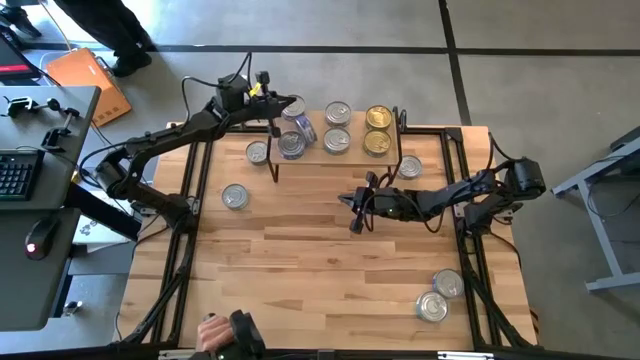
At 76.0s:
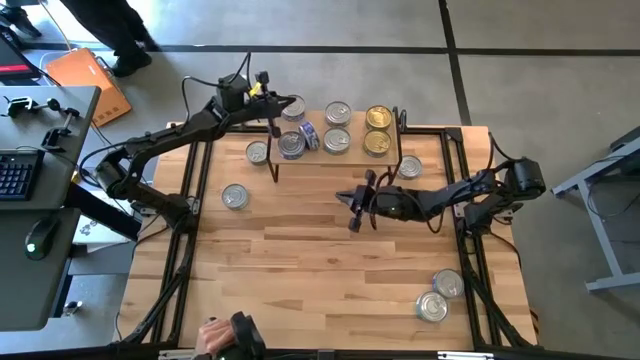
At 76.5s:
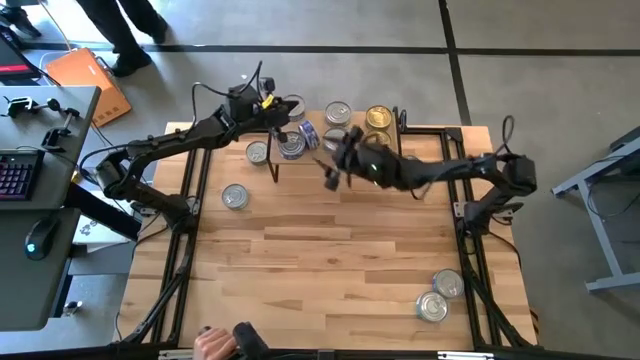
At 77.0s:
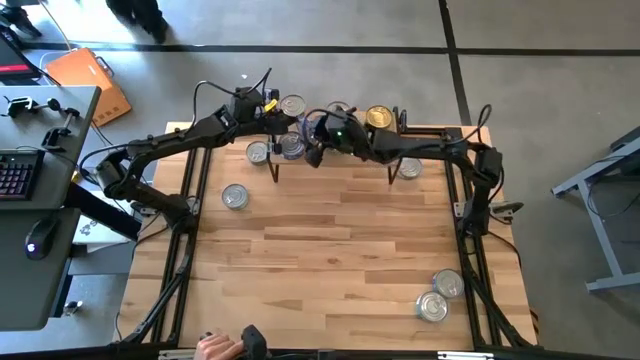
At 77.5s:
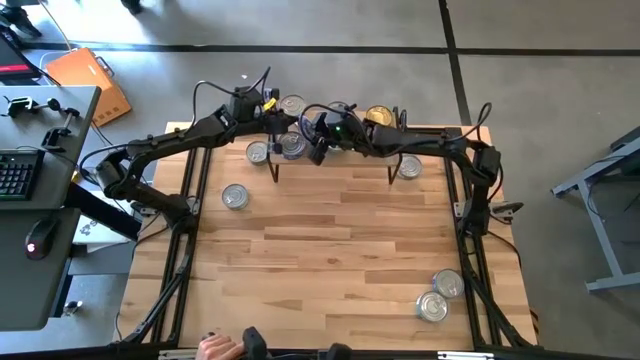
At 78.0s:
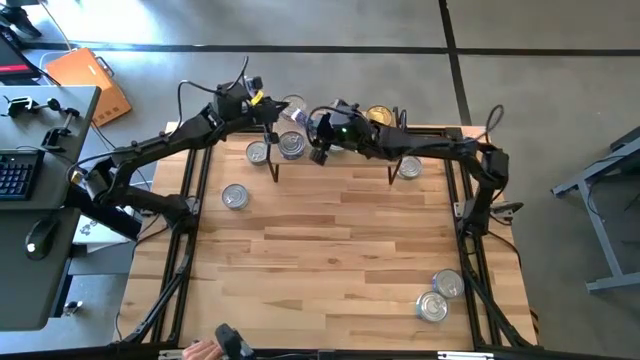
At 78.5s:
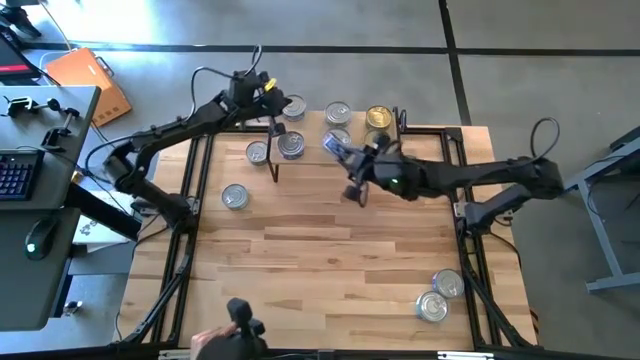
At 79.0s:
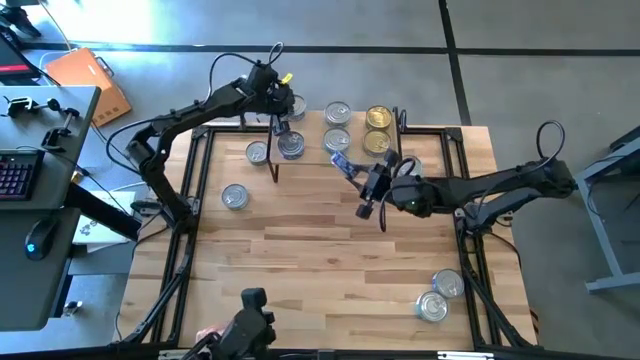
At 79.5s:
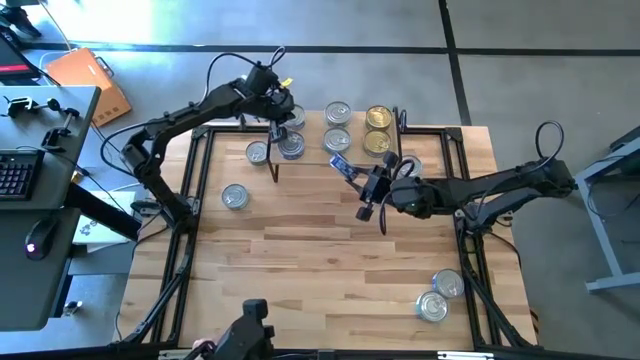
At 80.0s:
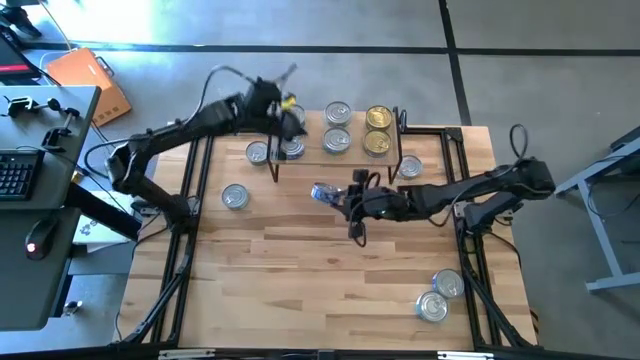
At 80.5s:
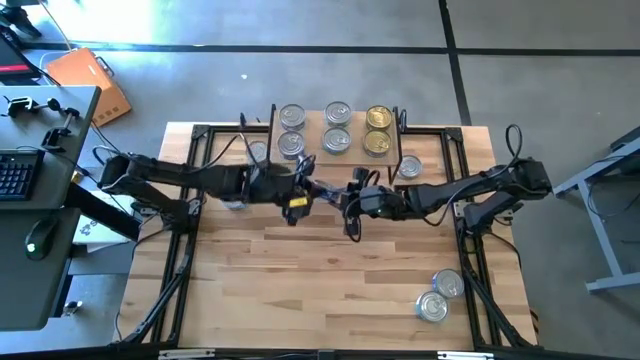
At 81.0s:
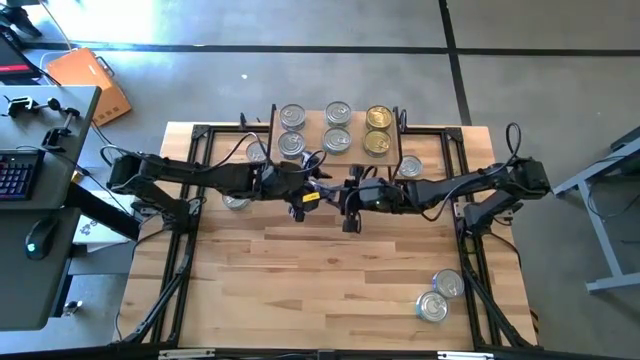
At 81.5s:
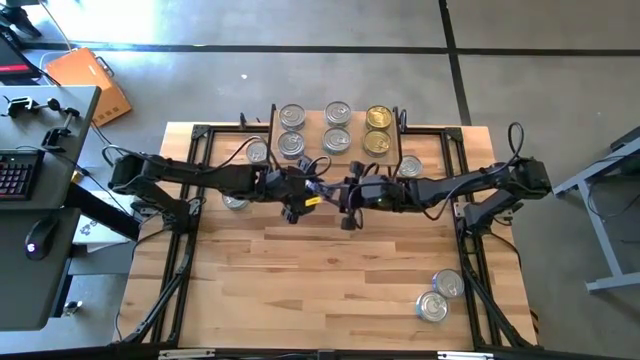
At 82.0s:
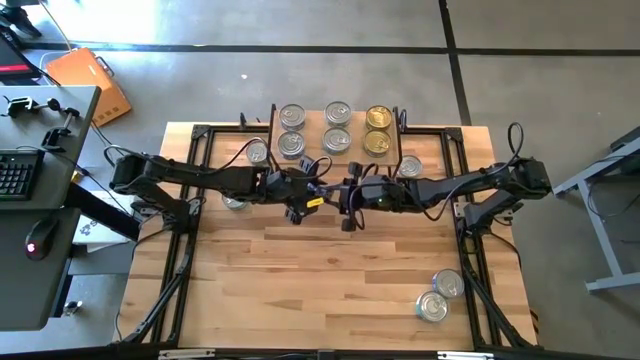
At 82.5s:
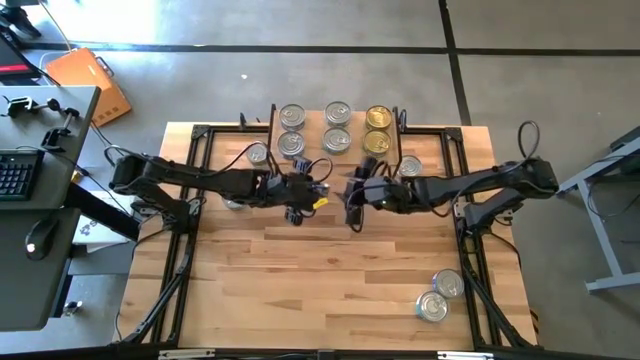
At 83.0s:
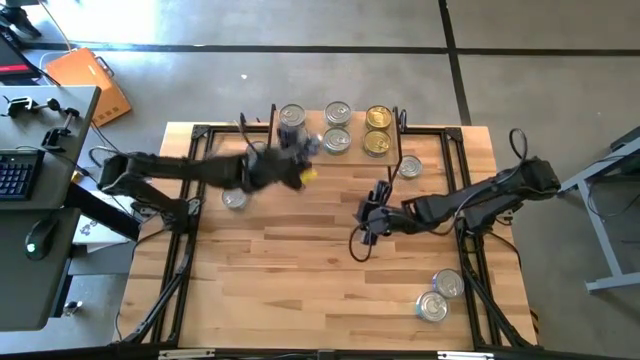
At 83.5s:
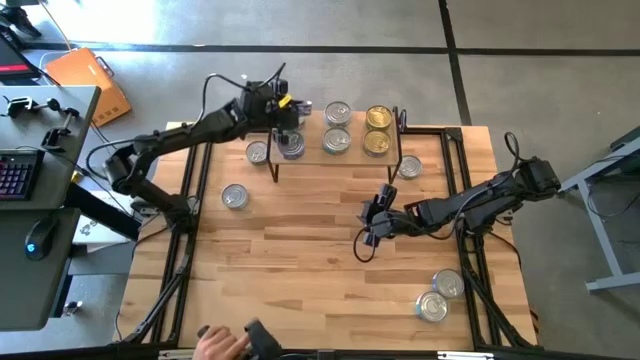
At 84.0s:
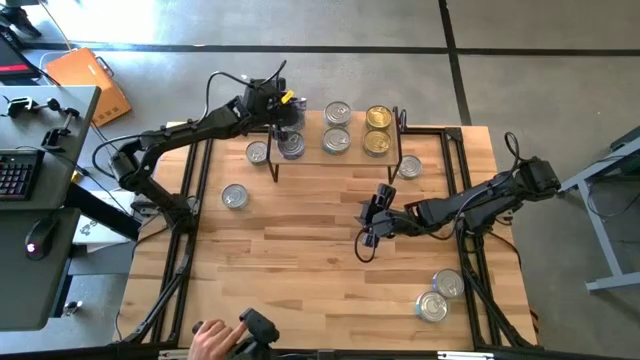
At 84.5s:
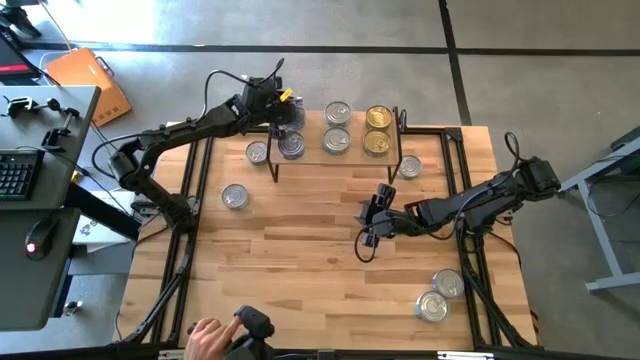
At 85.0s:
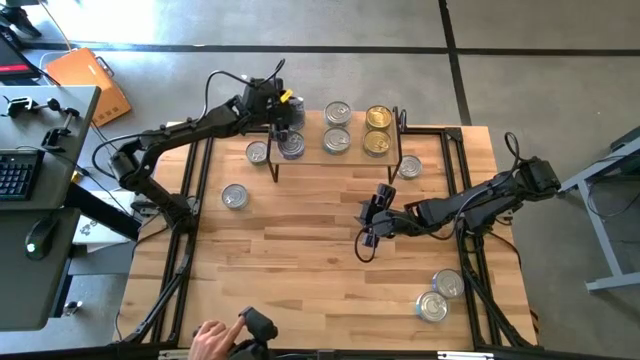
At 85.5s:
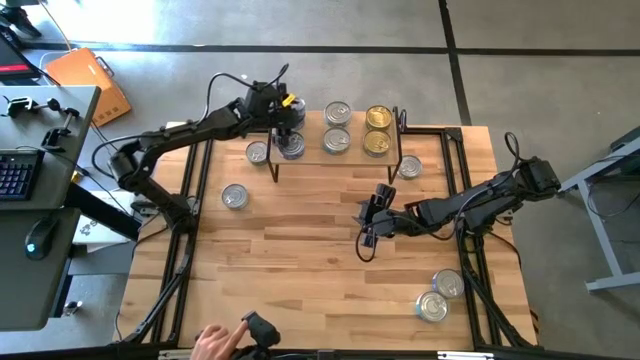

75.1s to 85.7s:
Task: Stack canned seafood by type on shelf
Stack the blue tuna can on top of the other blue tuna can on the shelf

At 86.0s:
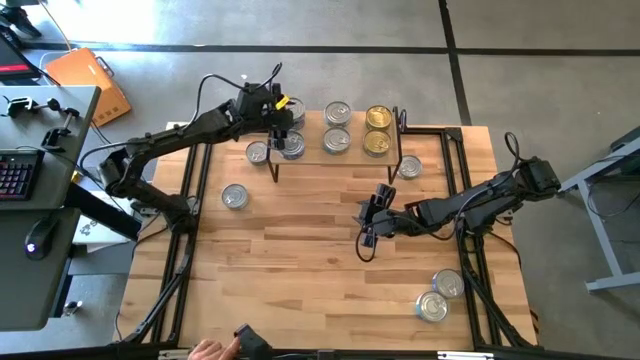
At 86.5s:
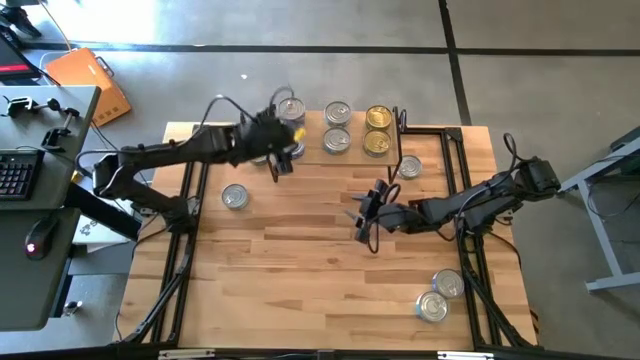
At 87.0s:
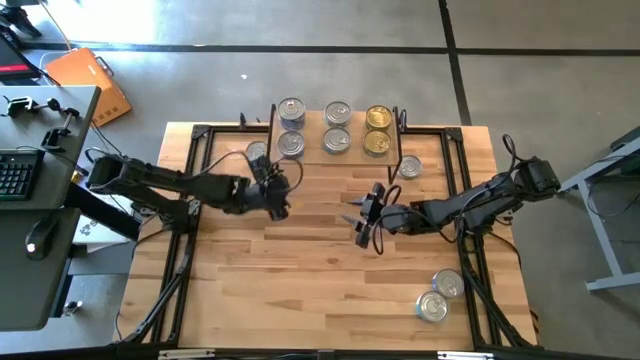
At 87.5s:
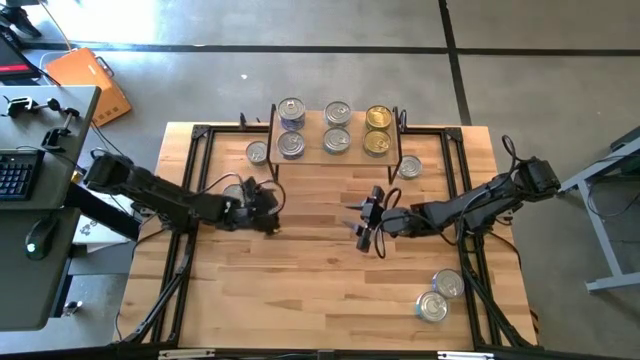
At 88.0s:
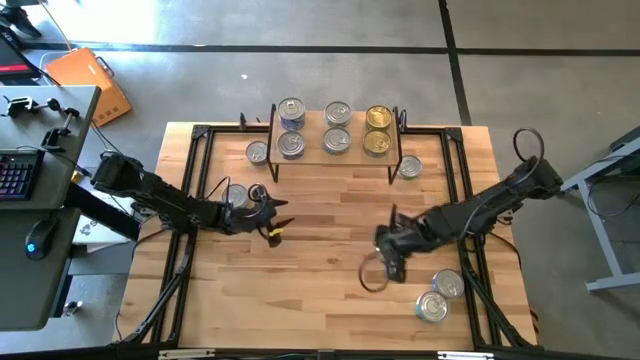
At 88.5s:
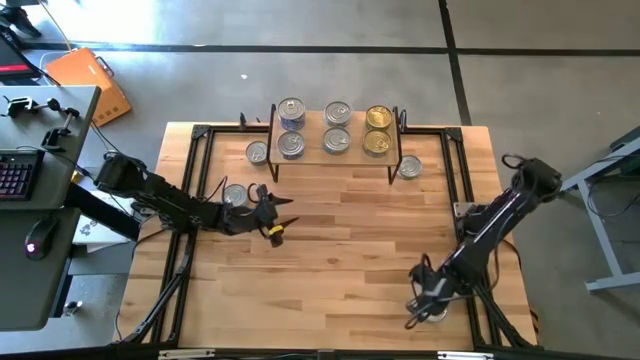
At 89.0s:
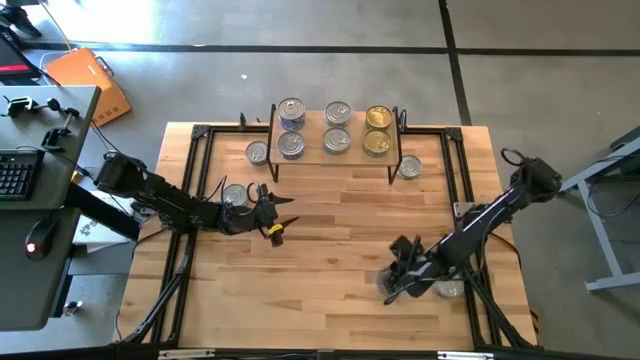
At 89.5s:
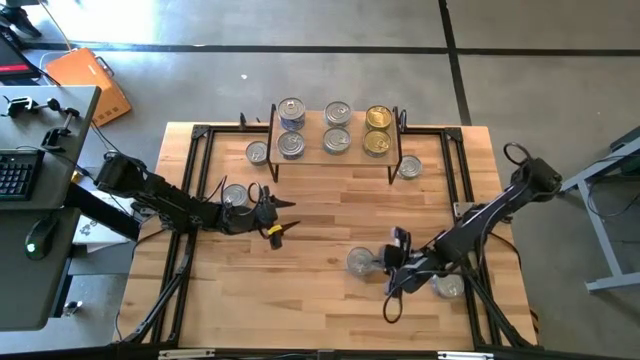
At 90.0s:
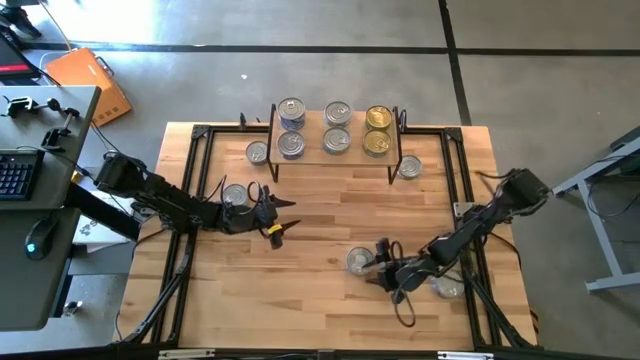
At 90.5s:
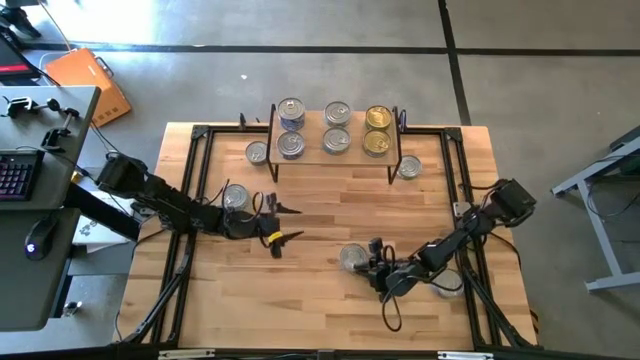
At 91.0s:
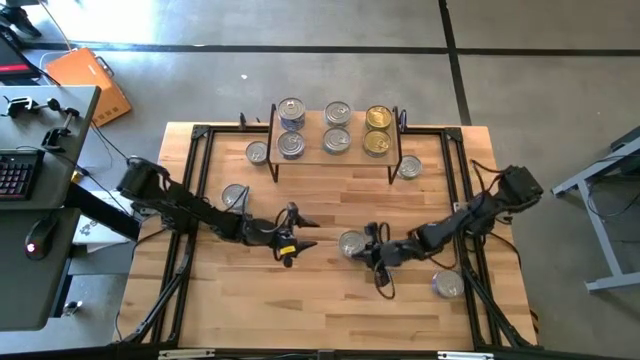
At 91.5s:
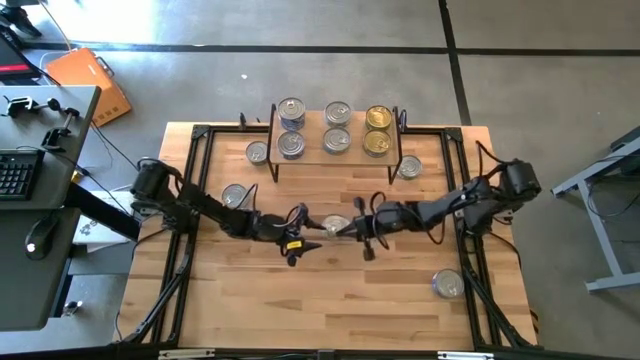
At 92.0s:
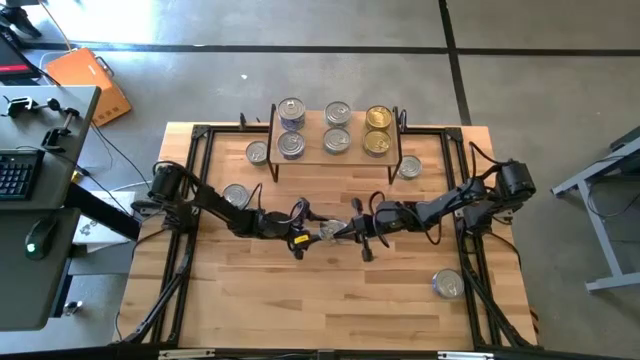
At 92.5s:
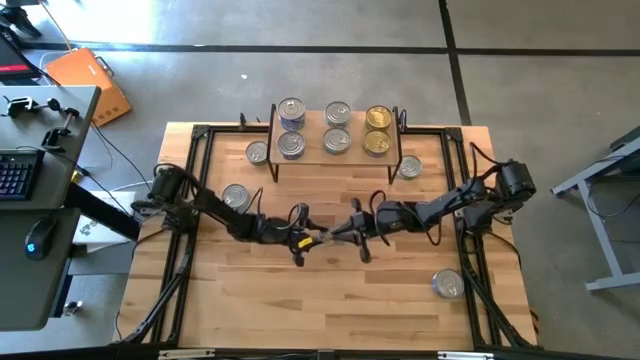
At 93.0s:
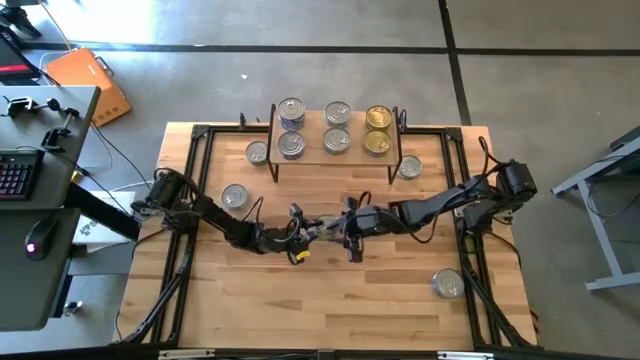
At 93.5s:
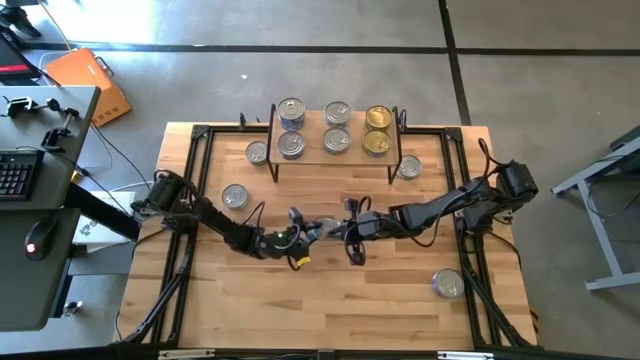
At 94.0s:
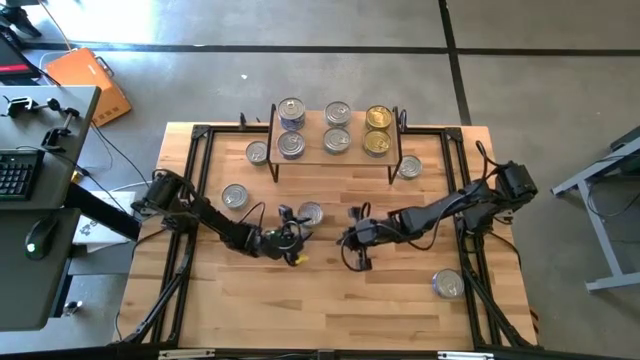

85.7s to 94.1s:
Stack the yellow-blue tuna can on top of the other yellow-blue tuna can on the shelf

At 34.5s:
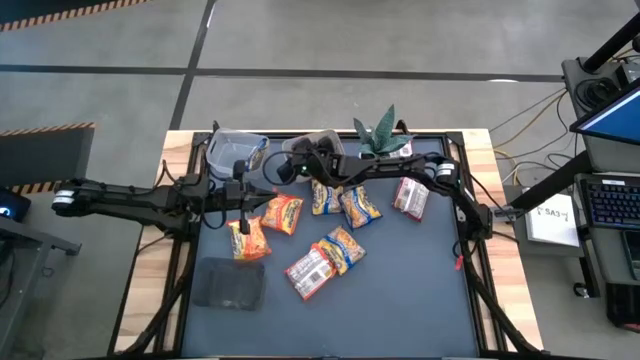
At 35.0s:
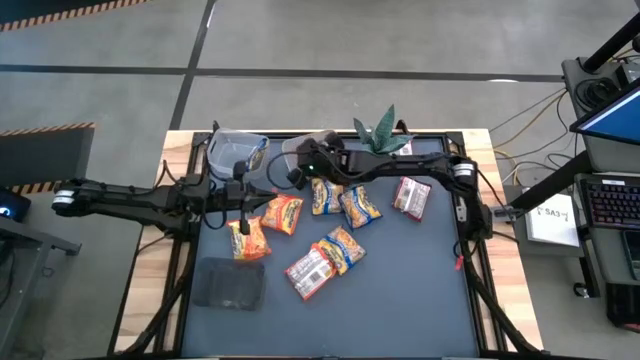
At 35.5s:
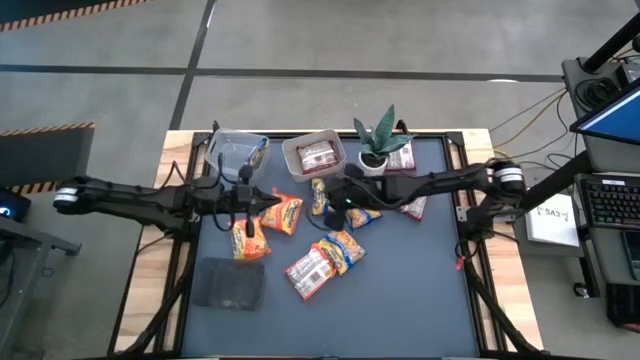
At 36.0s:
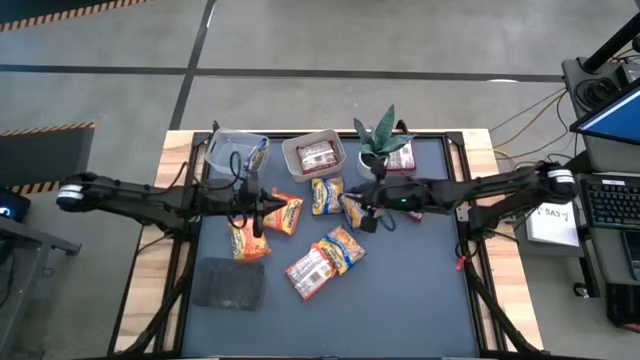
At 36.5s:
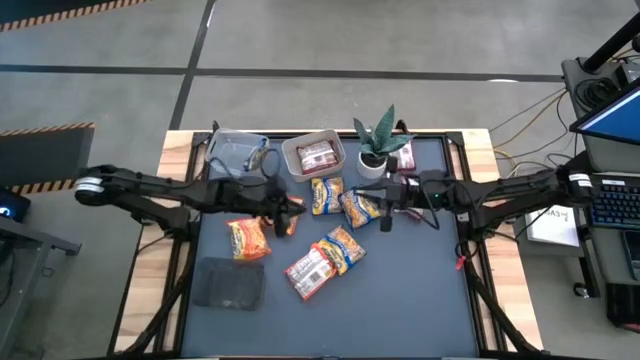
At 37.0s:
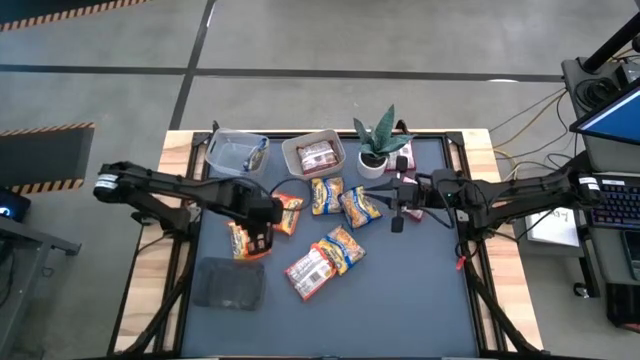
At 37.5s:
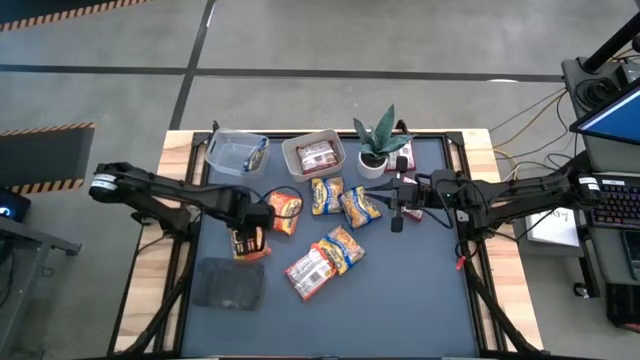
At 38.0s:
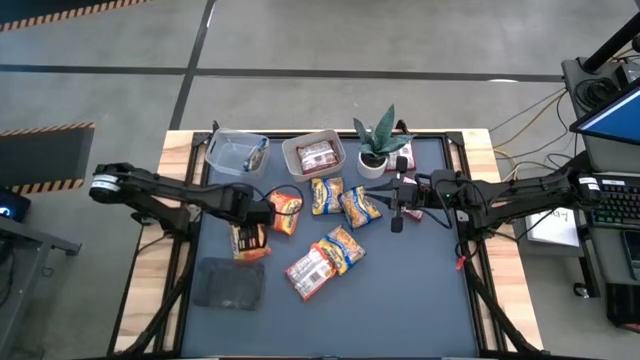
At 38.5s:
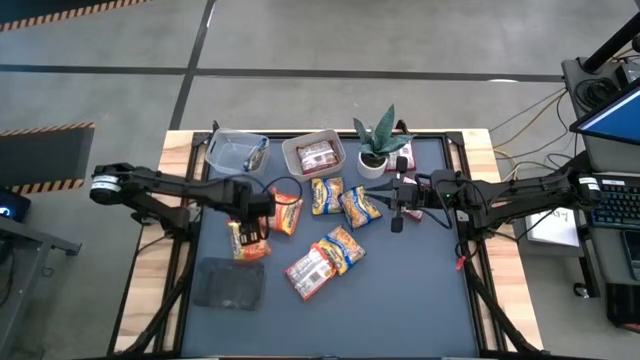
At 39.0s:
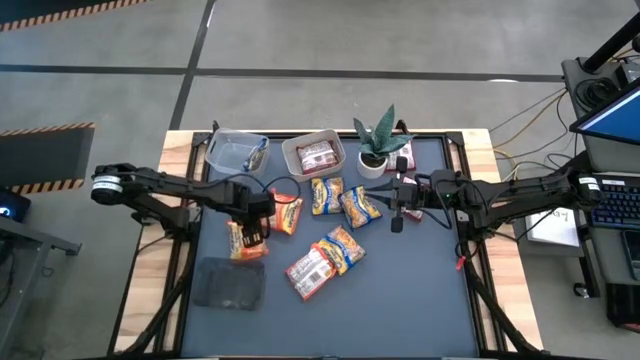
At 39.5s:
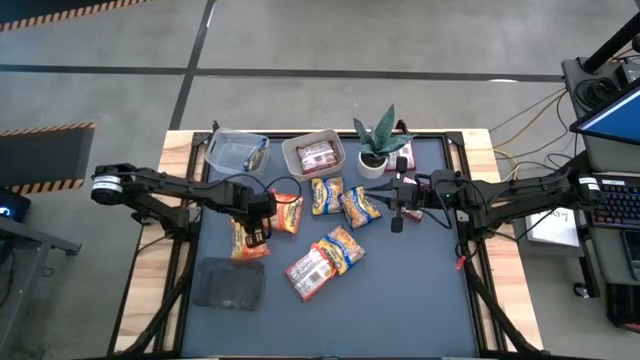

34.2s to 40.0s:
Task: Sort Maruchan noodles
Adjust the orange noodle pack
